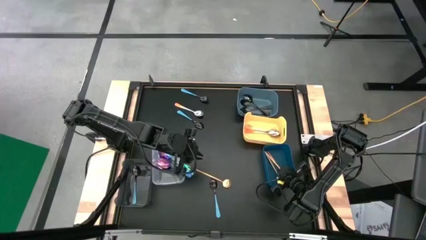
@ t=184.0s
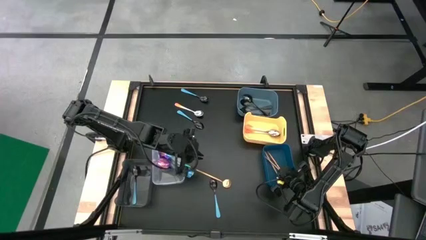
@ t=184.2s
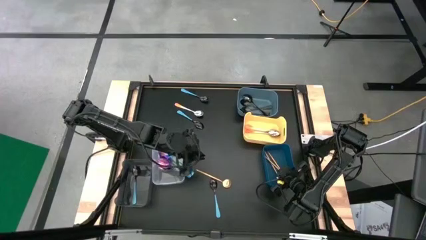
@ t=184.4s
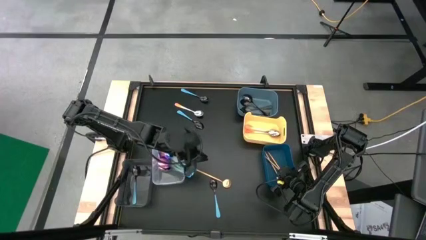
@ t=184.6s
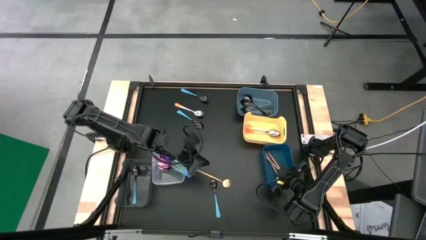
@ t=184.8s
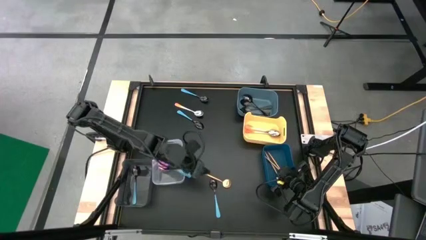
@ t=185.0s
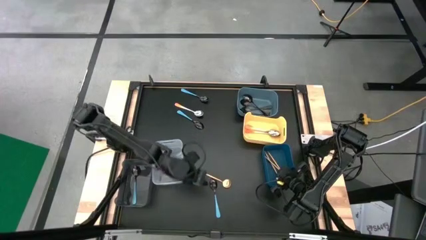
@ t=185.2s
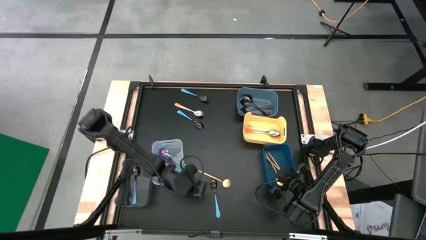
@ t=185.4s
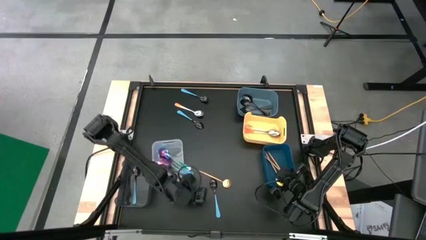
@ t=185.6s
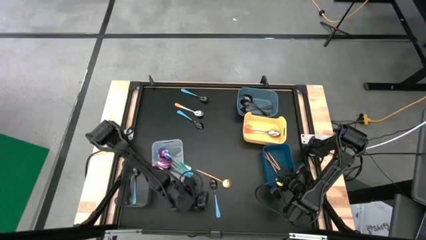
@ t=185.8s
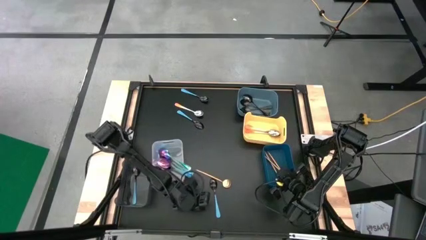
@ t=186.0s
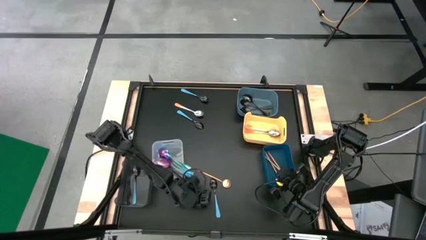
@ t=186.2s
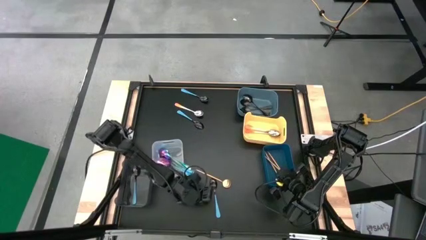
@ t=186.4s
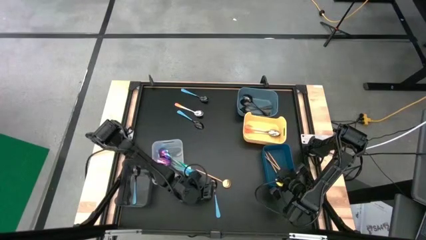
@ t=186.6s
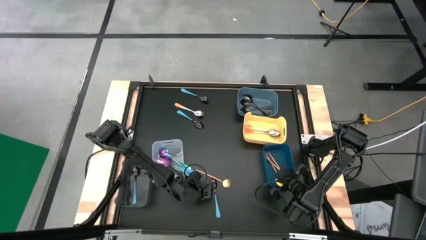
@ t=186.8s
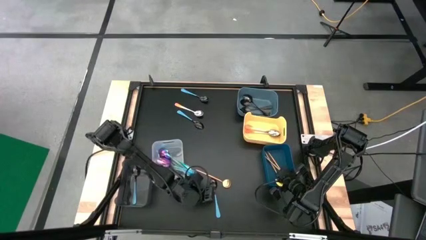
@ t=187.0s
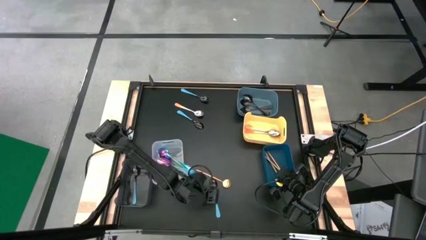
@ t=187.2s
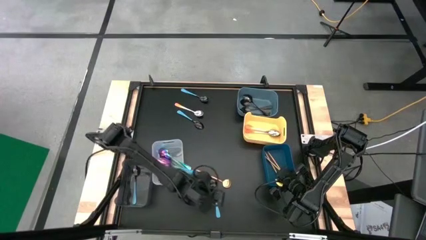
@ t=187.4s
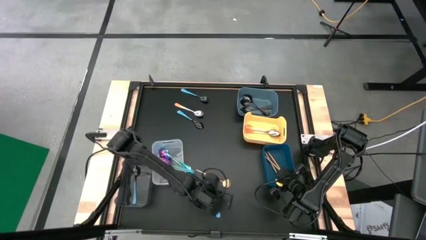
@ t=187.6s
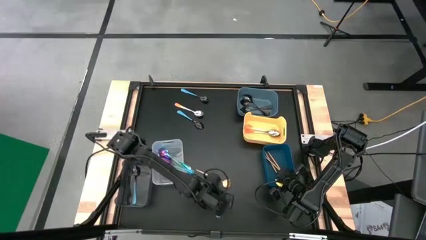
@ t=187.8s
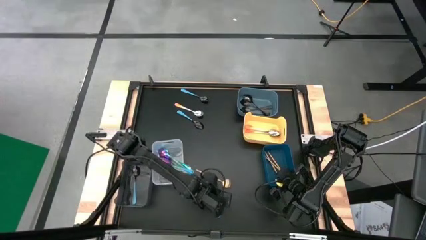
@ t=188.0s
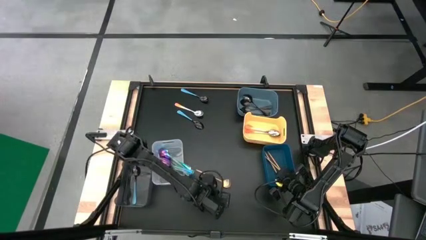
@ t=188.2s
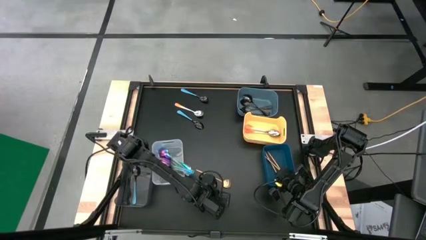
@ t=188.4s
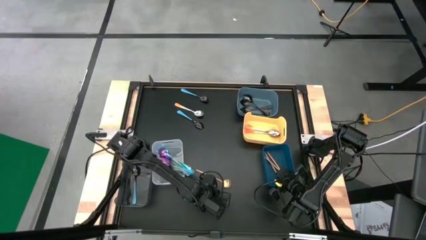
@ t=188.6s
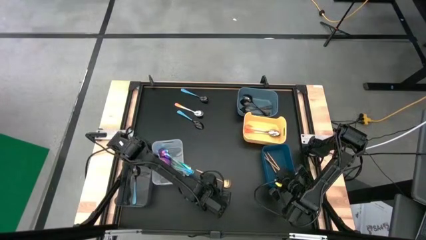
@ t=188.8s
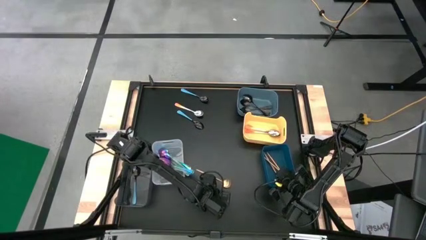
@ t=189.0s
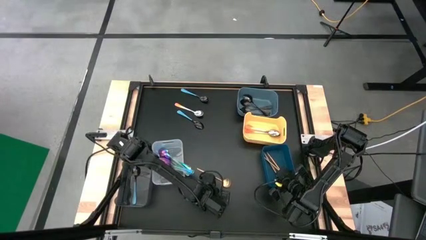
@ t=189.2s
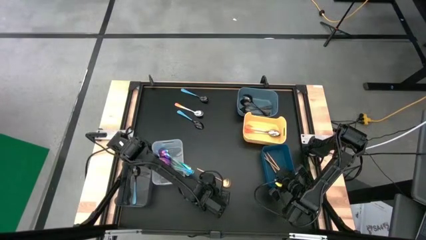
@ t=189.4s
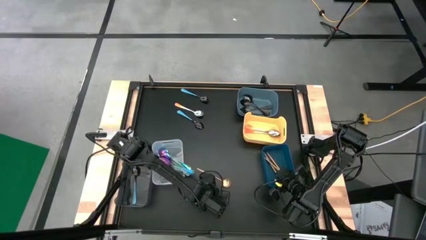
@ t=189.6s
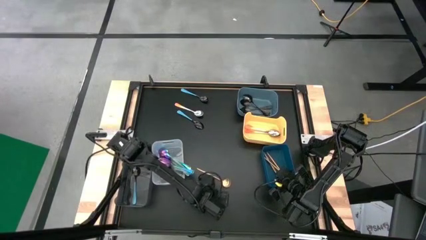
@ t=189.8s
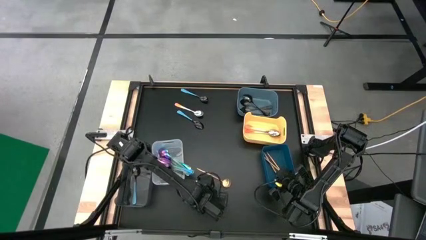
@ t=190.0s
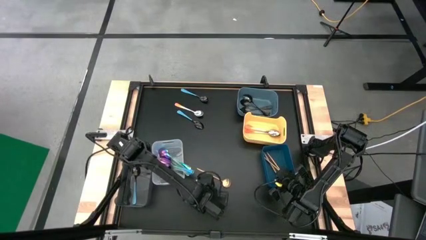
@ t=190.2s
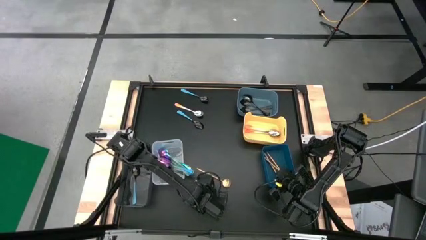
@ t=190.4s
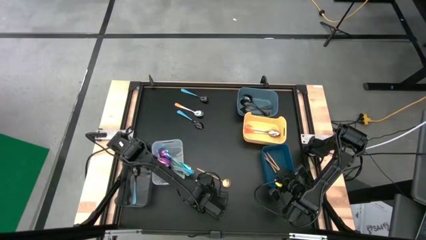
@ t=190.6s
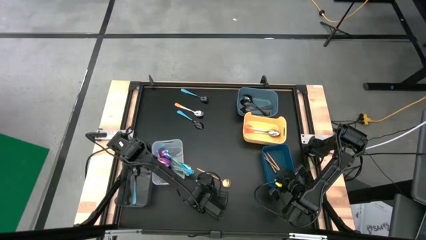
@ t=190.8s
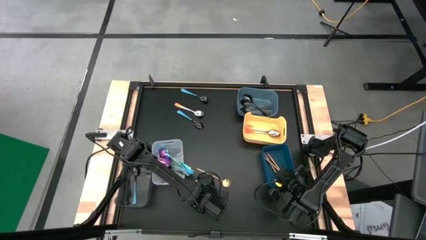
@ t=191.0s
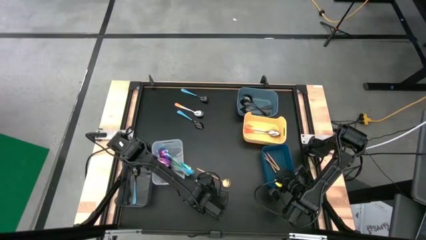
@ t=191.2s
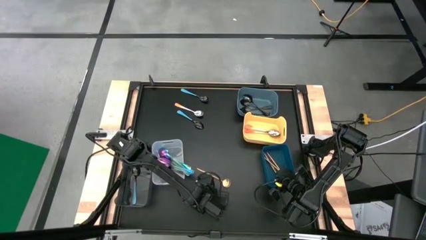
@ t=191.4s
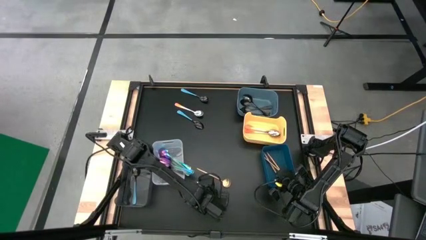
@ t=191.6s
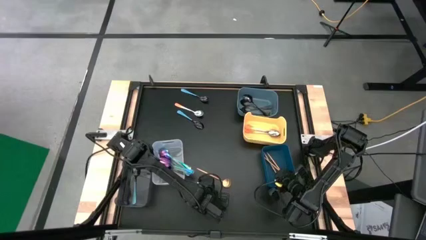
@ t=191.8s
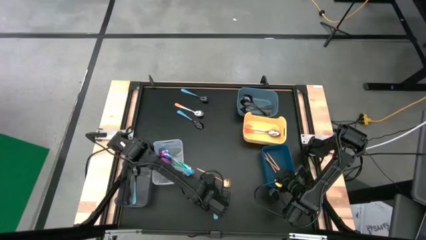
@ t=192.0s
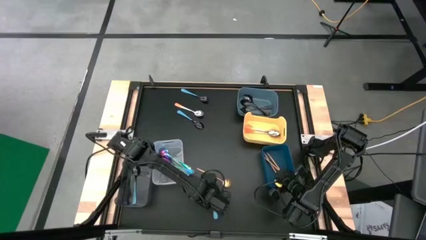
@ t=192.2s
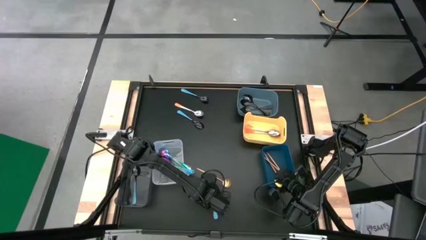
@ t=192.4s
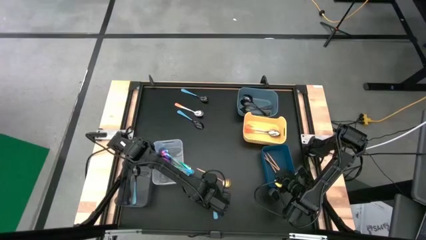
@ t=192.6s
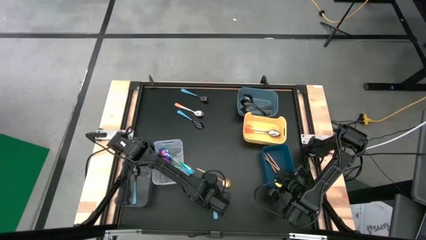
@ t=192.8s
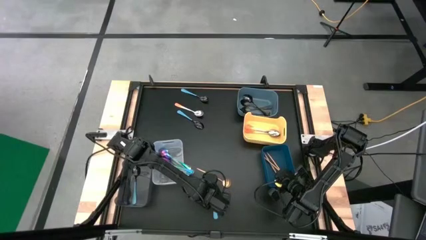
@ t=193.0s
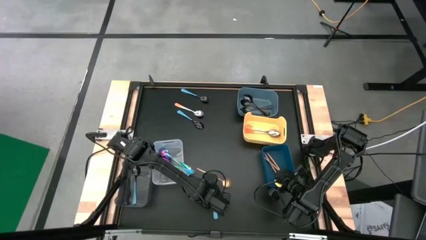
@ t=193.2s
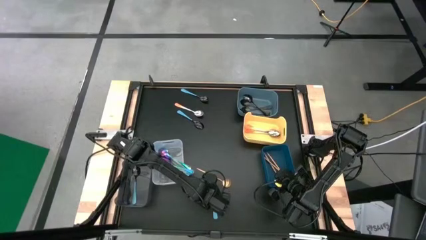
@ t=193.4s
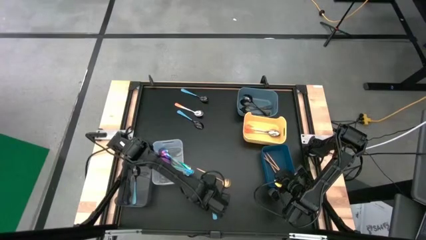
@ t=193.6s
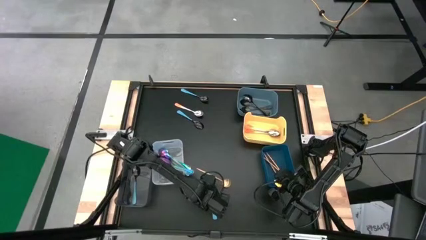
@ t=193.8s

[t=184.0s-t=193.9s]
Task: Sort silverware by color (type)
Put the light blue spoon into the black bin

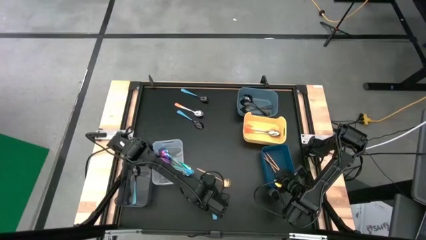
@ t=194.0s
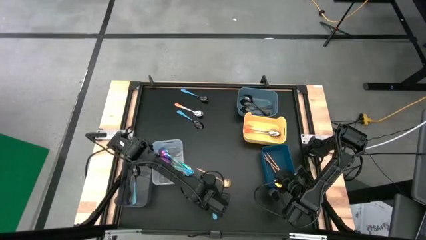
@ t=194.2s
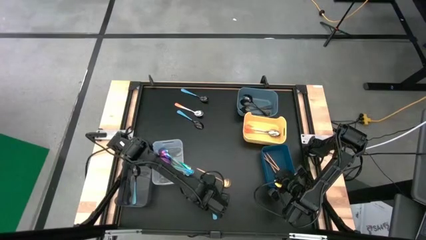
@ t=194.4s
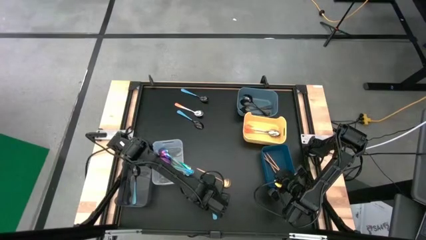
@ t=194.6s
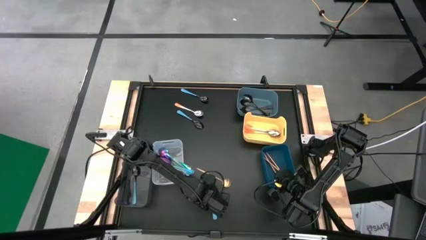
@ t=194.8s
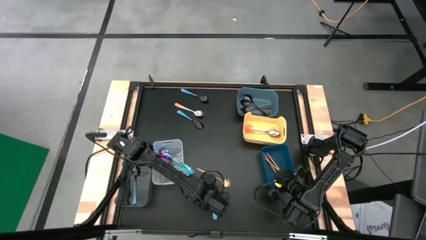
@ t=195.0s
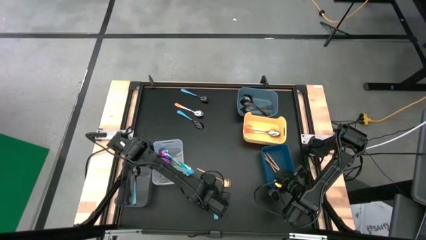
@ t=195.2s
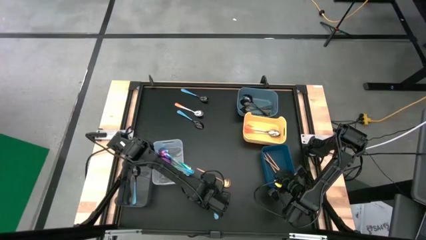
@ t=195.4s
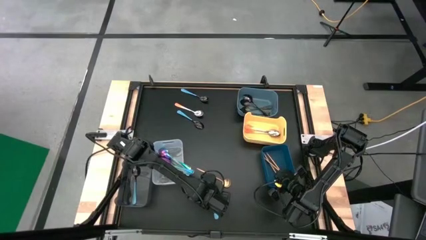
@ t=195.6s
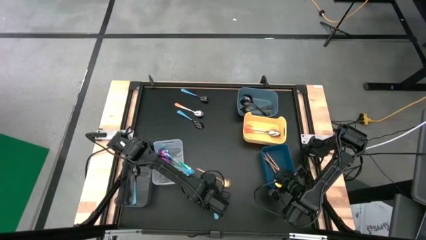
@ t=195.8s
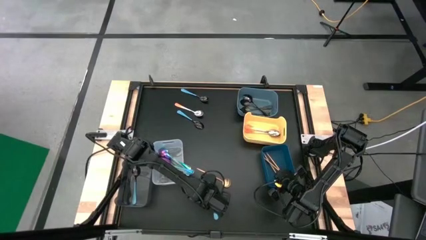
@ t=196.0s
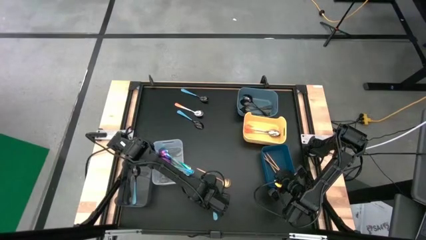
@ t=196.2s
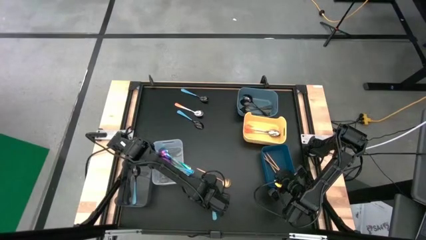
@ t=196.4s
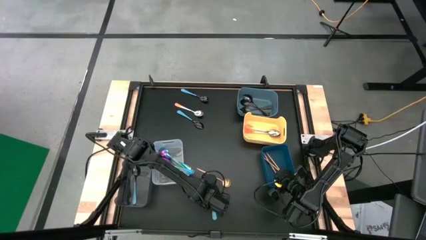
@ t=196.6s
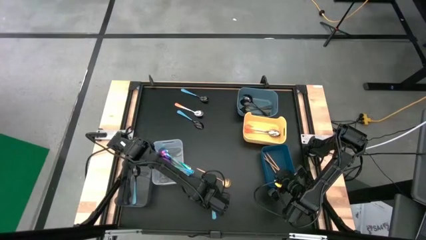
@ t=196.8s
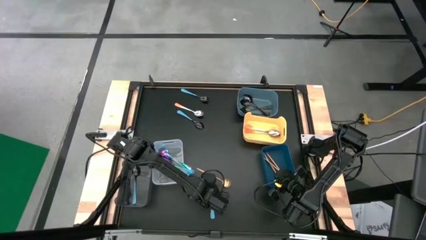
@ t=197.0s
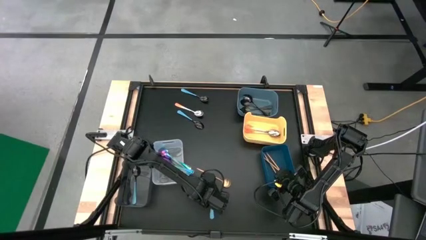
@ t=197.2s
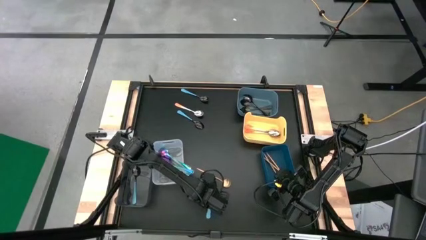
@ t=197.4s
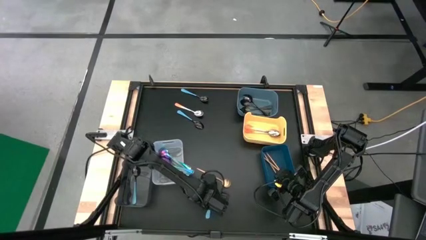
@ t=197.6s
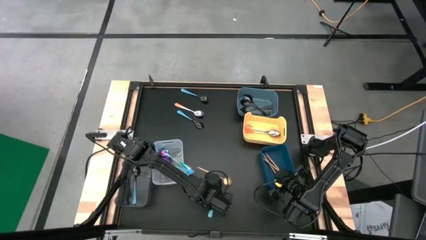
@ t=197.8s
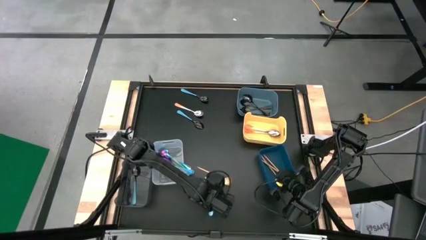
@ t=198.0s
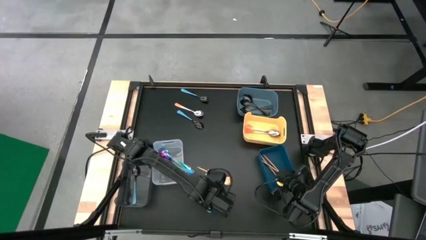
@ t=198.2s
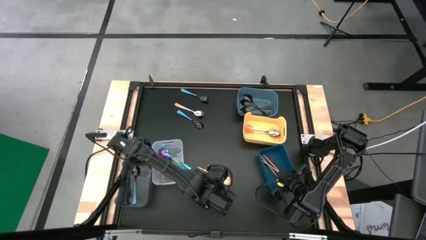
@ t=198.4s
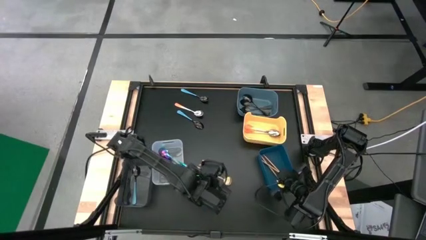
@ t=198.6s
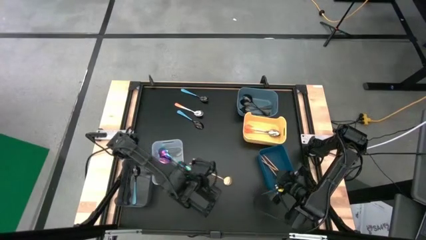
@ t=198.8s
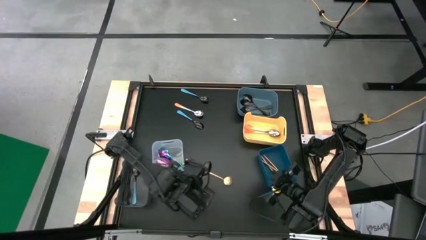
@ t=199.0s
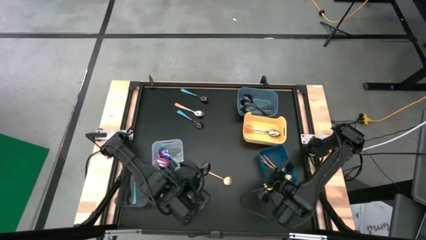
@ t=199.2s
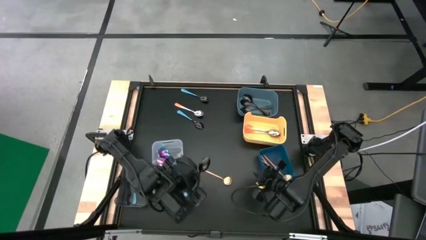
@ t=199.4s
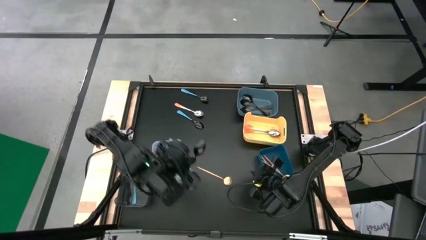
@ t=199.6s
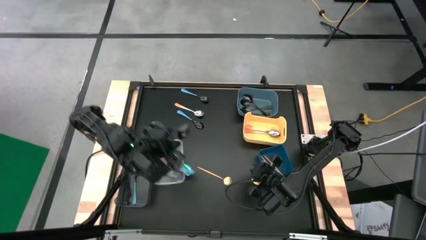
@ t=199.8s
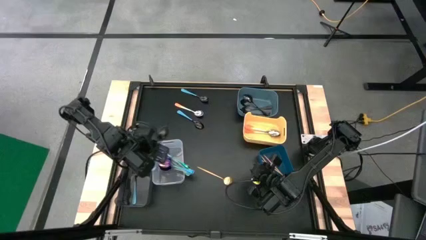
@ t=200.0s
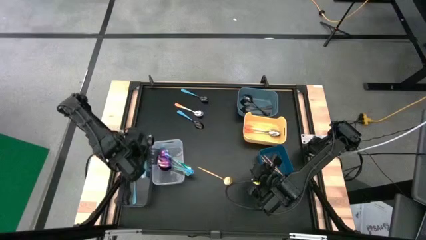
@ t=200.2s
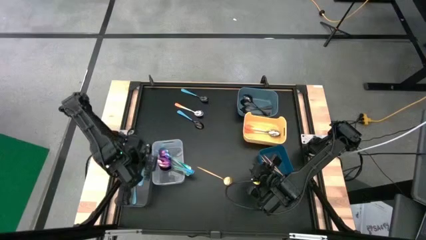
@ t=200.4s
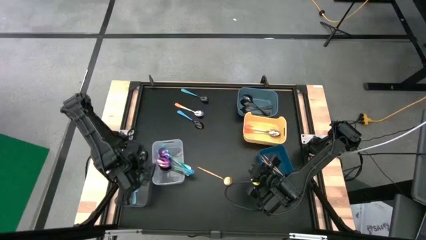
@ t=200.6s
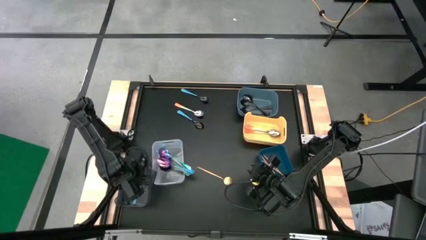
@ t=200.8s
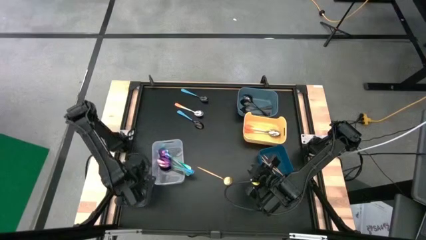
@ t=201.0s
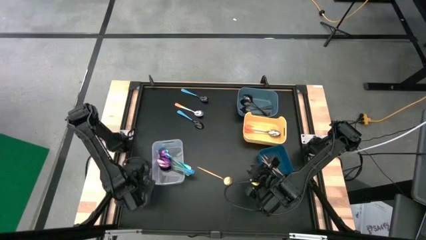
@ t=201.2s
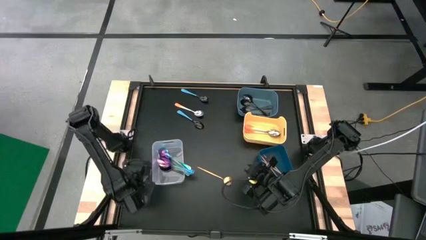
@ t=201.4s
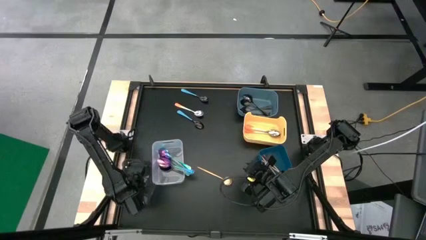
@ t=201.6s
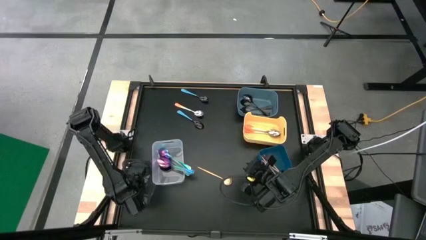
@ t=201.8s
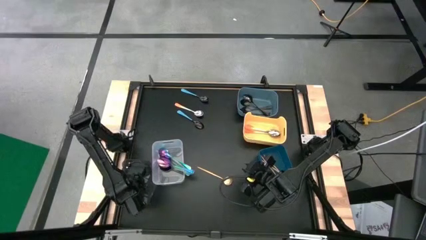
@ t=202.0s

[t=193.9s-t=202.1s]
Put the light blue spoon into the black bin
